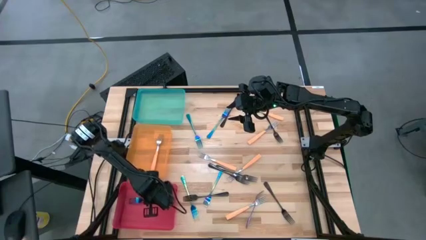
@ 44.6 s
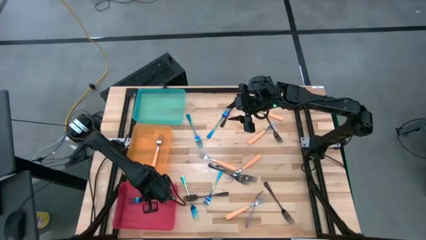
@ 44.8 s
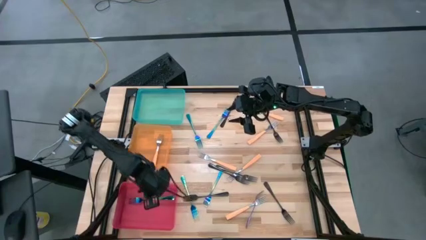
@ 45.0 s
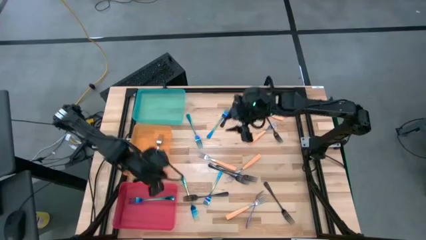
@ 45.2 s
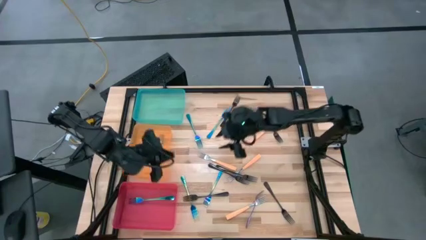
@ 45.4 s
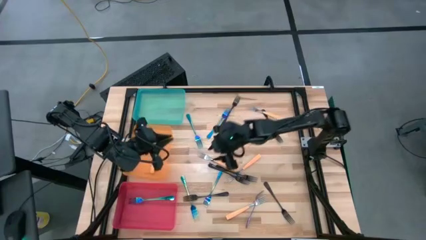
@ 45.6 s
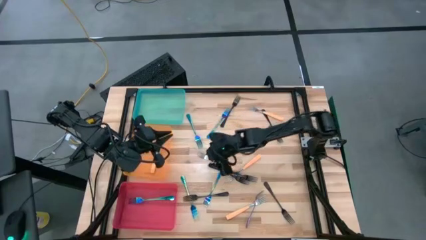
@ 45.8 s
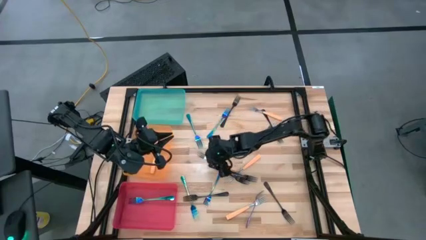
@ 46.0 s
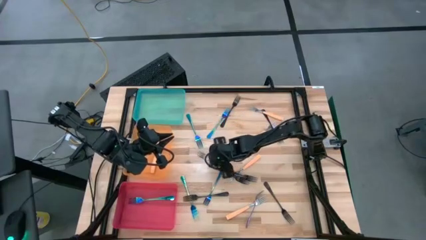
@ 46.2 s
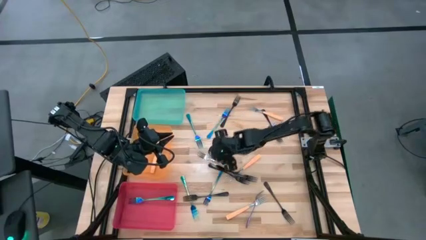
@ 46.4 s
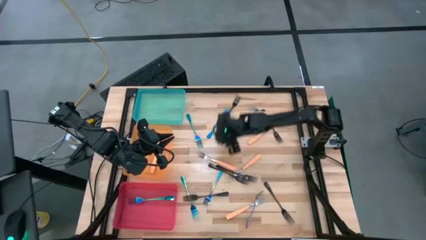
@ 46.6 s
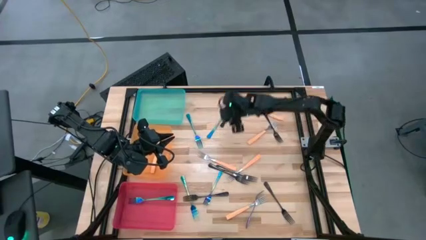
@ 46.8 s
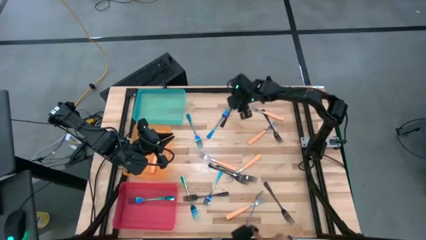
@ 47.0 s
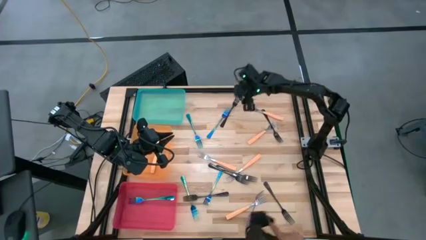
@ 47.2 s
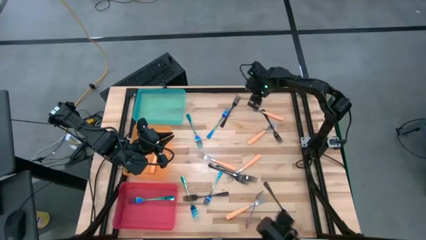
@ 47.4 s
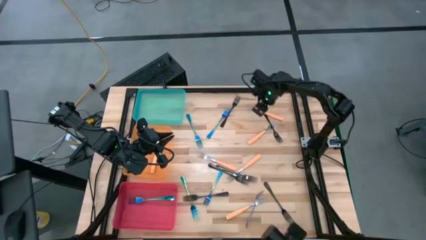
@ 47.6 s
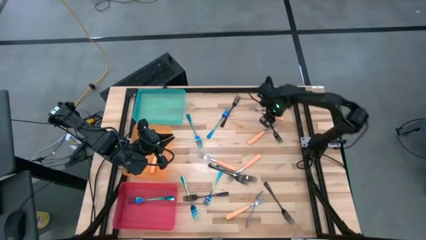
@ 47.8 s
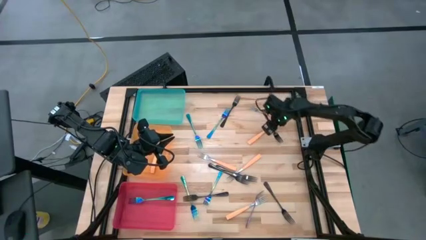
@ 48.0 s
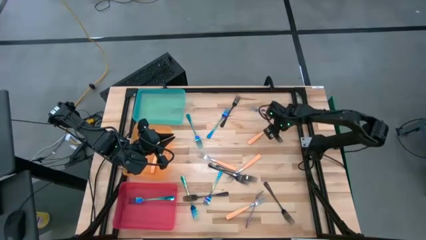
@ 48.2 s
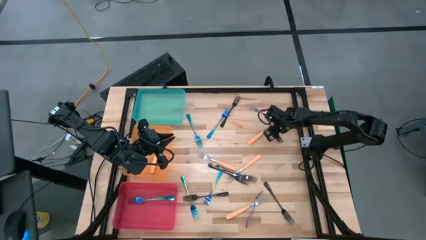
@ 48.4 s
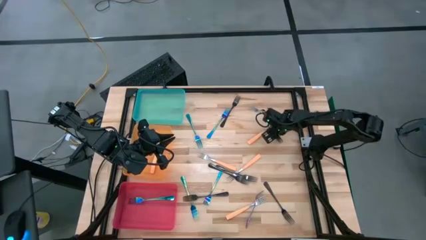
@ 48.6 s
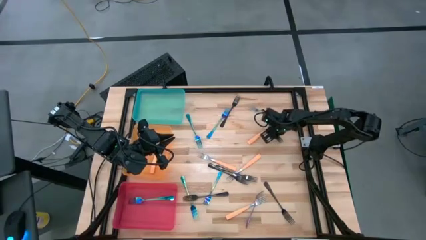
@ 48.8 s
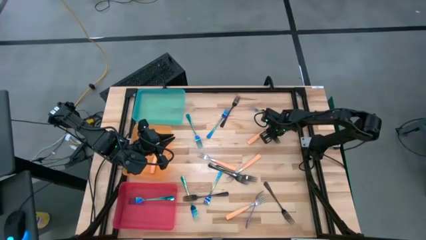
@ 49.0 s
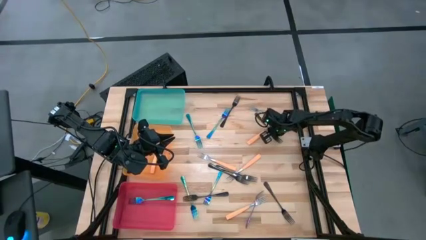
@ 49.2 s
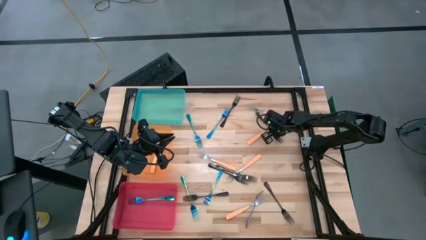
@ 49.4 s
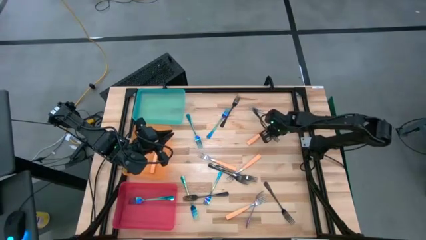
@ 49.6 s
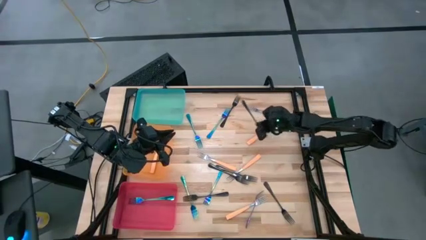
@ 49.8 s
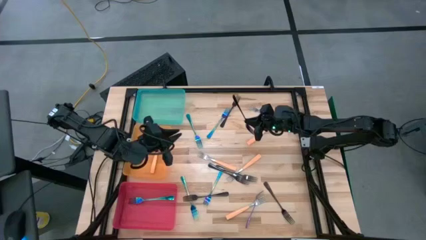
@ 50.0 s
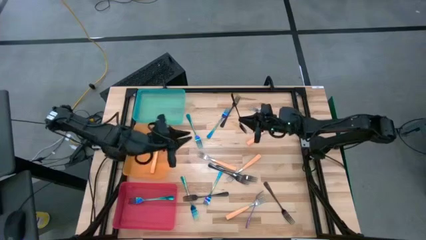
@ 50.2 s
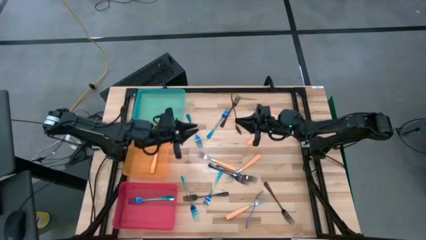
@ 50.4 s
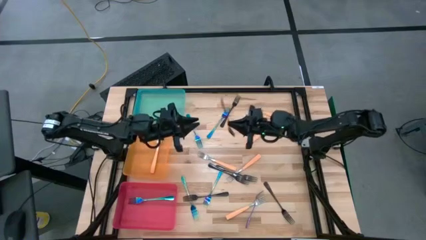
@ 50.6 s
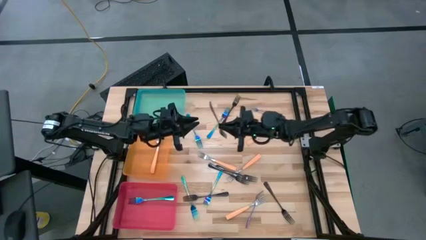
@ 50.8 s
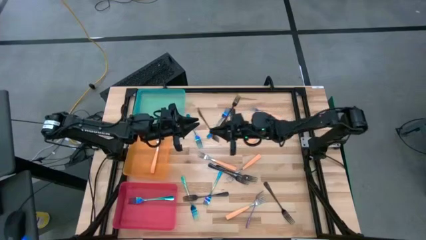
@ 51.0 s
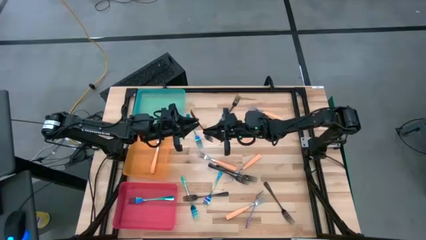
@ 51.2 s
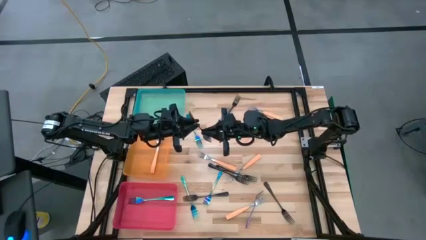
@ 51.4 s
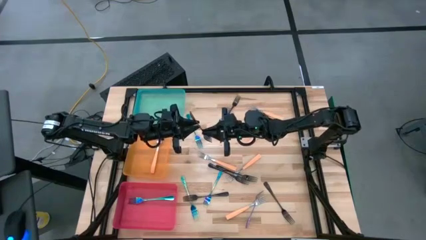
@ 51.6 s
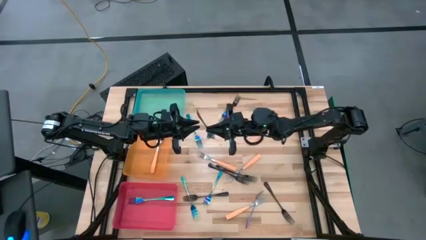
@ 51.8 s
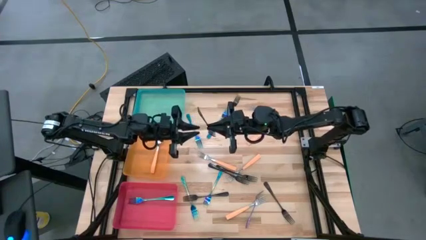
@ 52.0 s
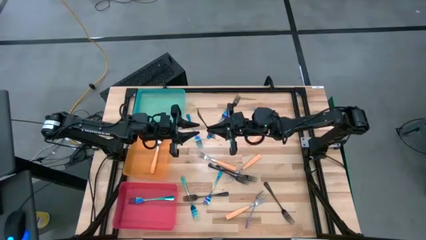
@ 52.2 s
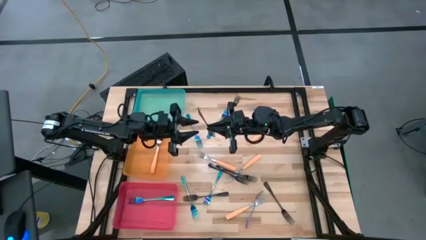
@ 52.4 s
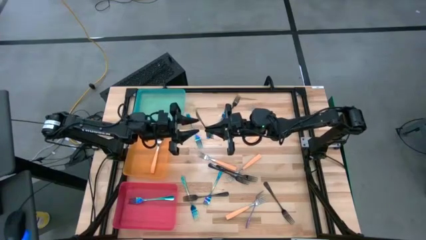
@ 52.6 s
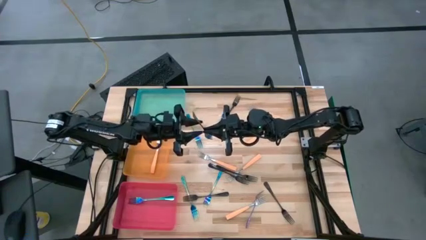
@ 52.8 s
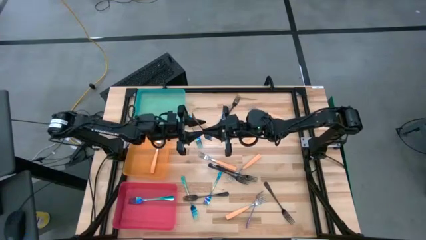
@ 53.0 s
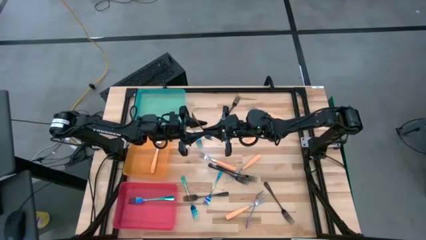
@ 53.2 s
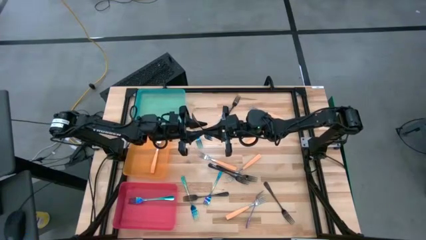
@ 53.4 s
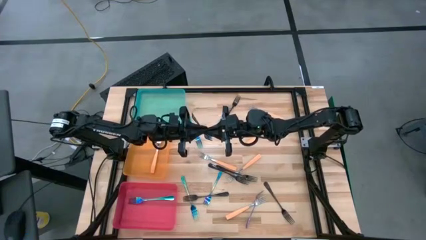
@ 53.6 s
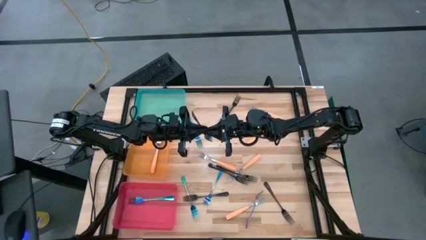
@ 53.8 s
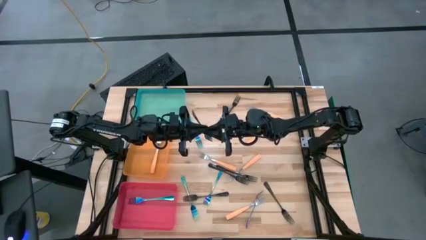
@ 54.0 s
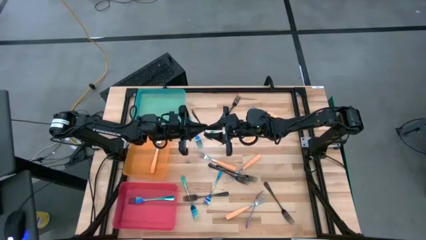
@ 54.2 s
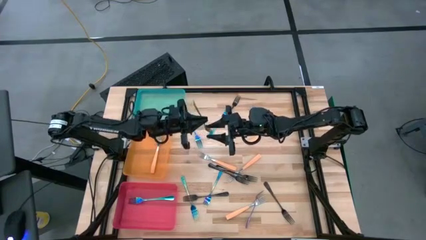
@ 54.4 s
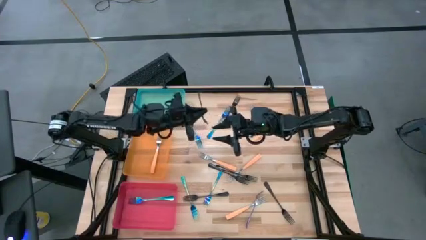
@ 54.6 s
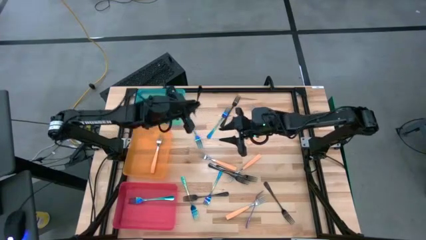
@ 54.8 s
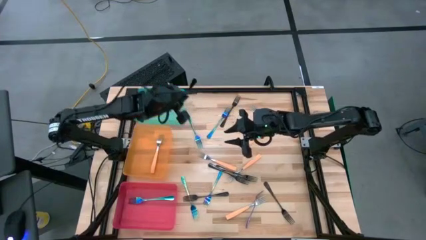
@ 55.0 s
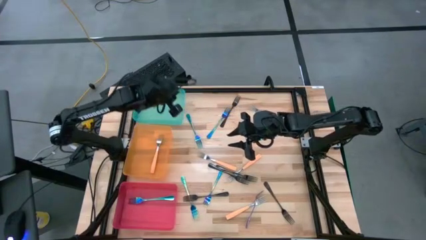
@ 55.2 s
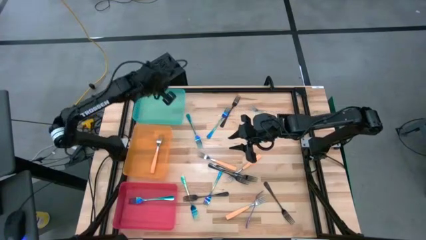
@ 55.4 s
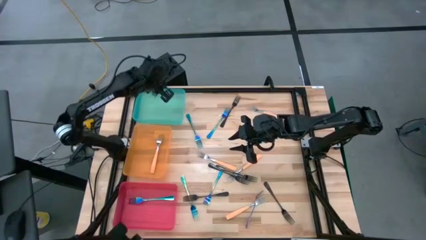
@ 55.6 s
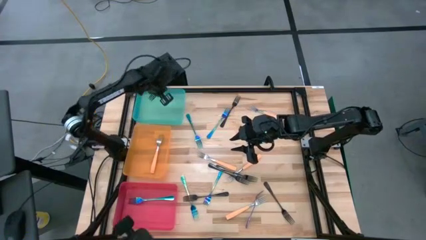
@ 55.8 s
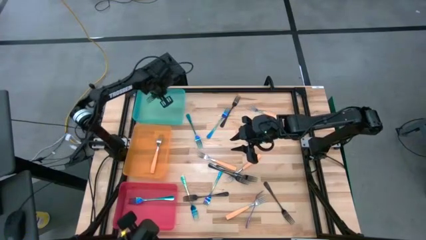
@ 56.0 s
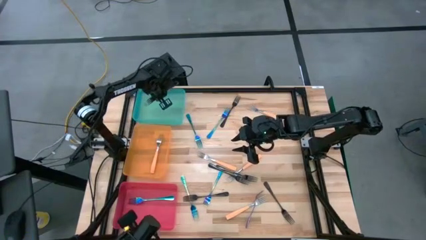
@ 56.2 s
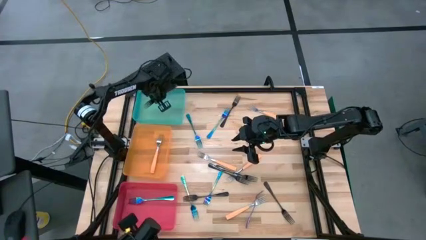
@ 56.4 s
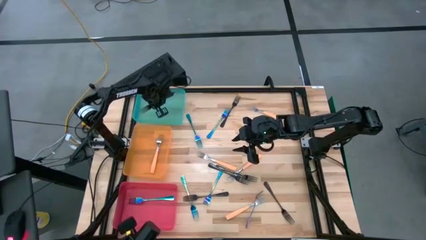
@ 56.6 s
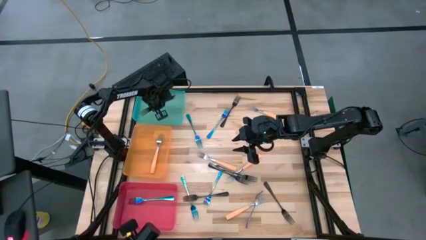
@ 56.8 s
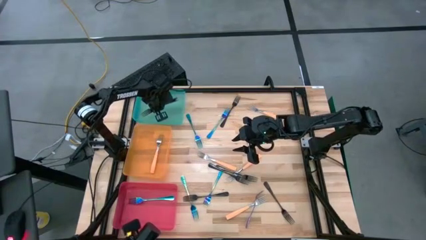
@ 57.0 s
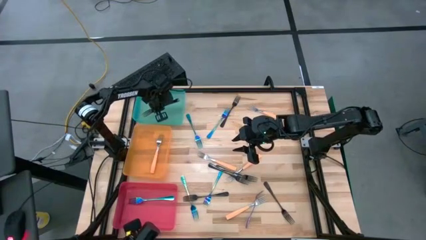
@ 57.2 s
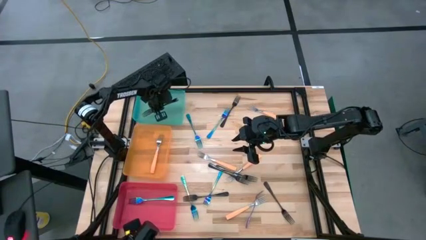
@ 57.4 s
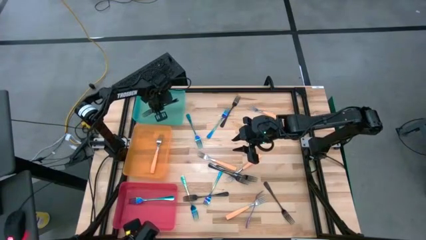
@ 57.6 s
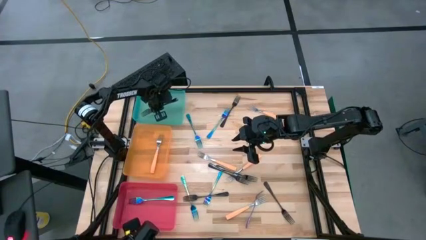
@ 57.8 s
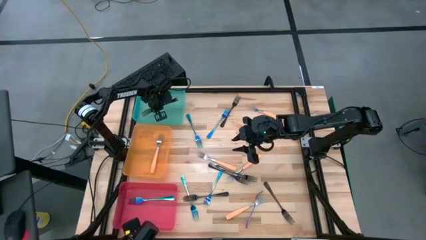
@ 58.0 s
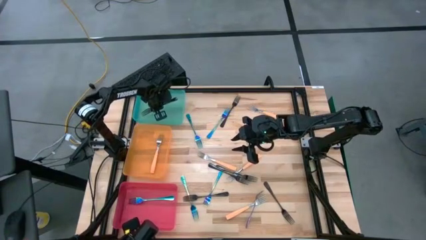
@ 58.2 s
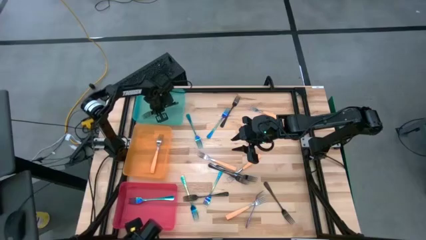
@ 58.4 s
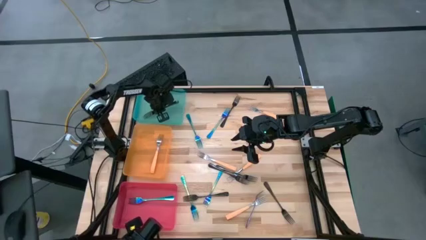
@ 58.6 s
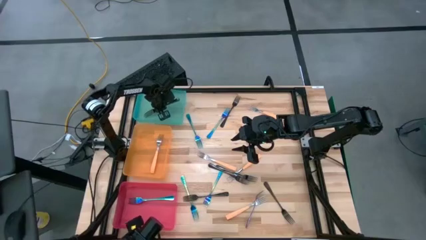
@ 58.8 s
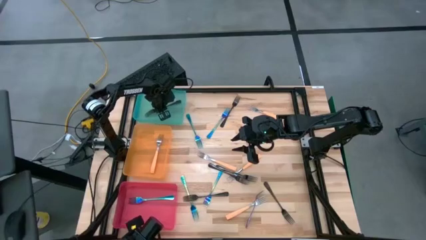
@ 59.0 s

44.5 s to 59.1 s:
Task: Sort silverware by color (type)
Put the black fork into the blue bin
